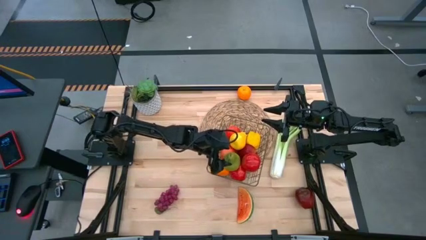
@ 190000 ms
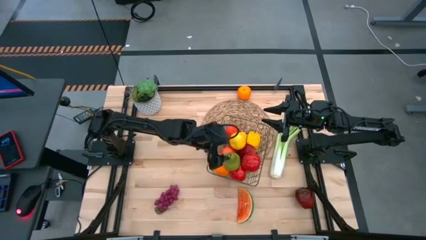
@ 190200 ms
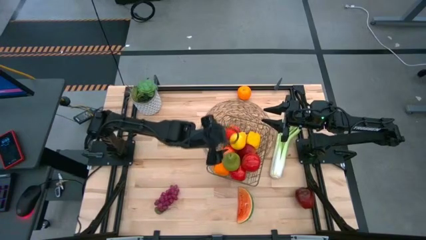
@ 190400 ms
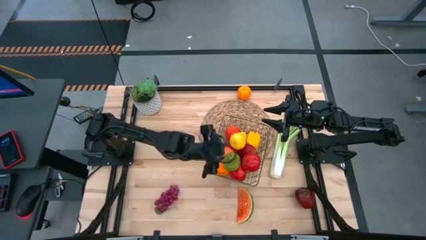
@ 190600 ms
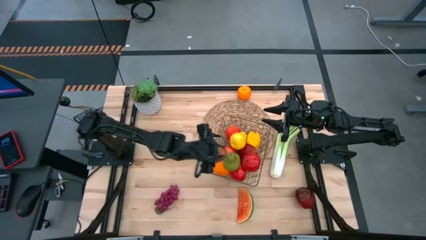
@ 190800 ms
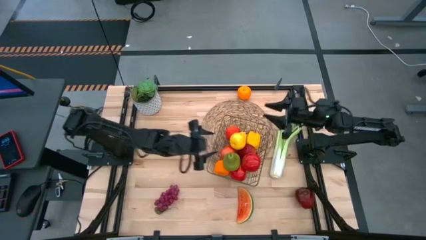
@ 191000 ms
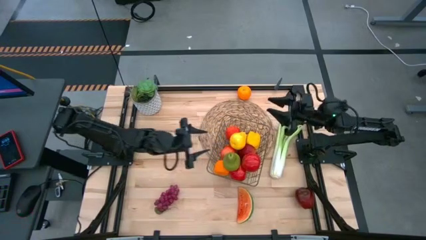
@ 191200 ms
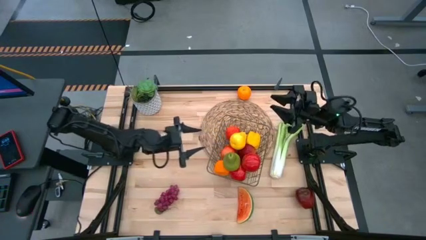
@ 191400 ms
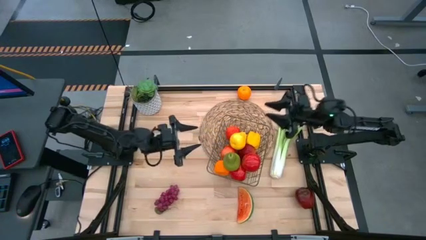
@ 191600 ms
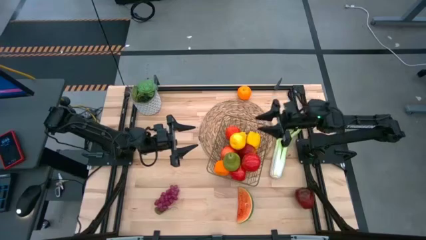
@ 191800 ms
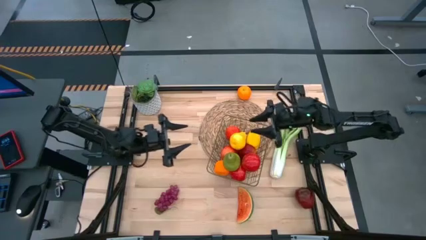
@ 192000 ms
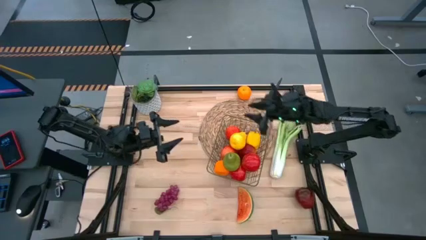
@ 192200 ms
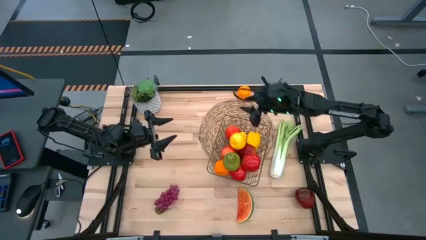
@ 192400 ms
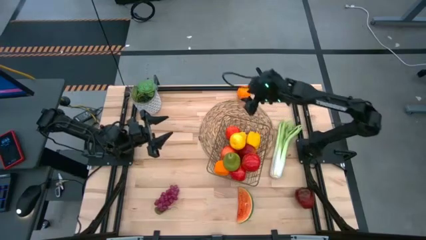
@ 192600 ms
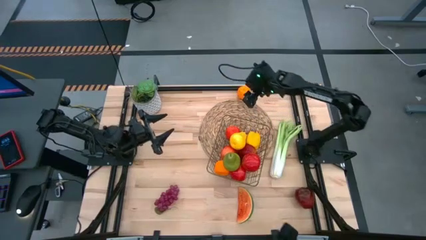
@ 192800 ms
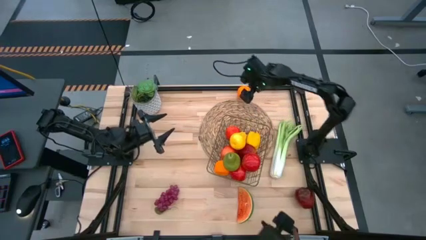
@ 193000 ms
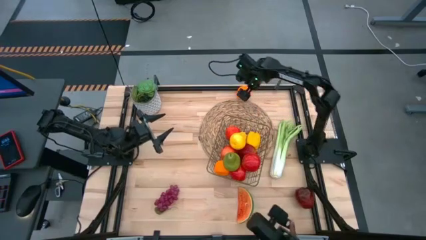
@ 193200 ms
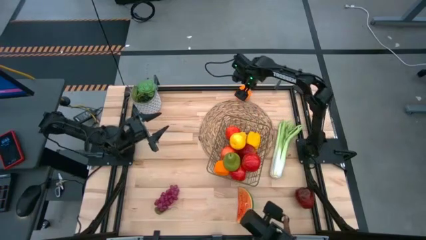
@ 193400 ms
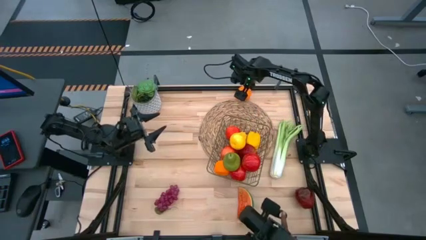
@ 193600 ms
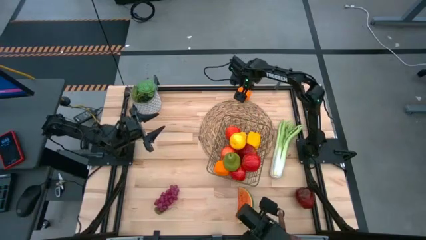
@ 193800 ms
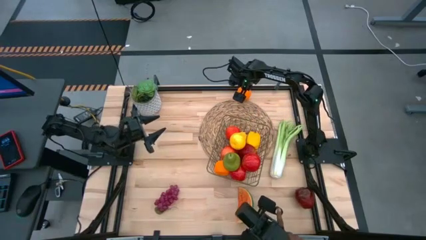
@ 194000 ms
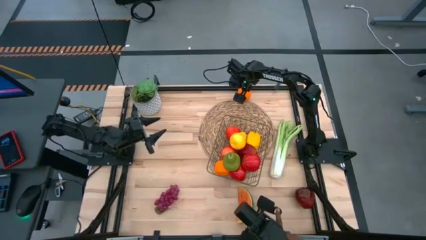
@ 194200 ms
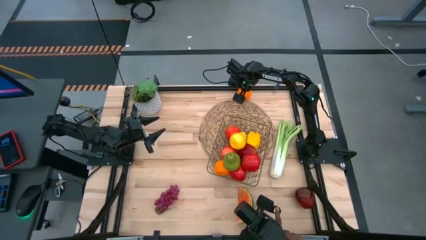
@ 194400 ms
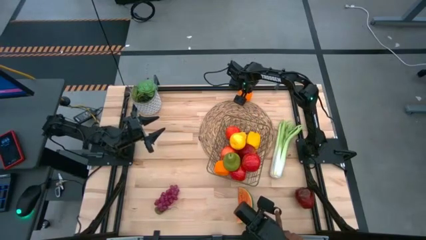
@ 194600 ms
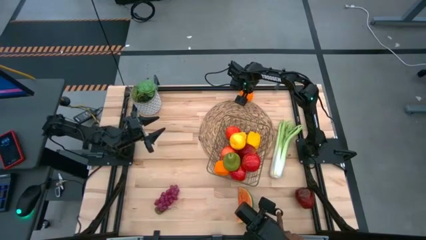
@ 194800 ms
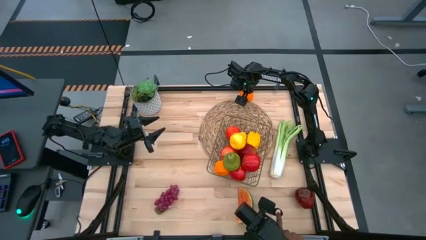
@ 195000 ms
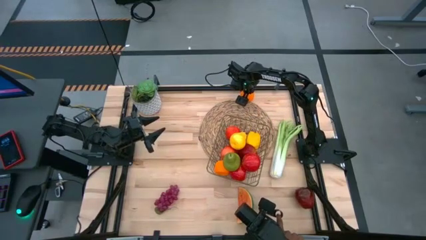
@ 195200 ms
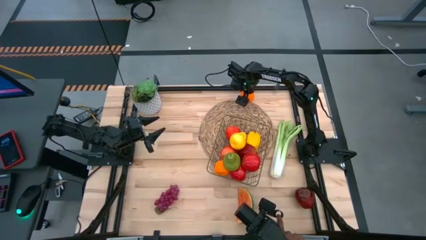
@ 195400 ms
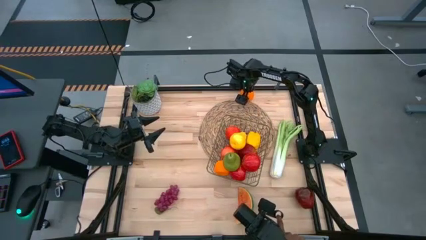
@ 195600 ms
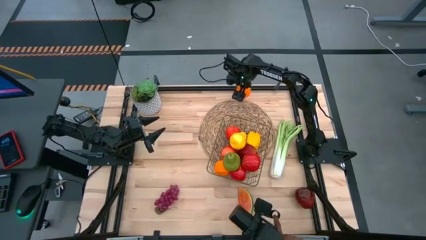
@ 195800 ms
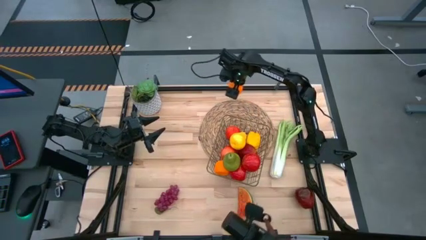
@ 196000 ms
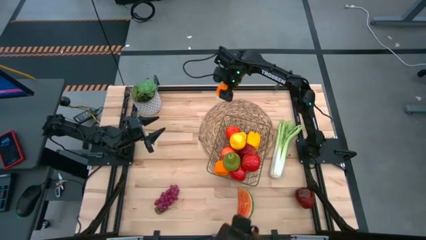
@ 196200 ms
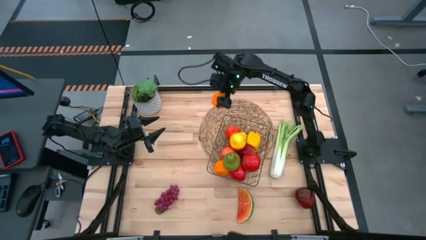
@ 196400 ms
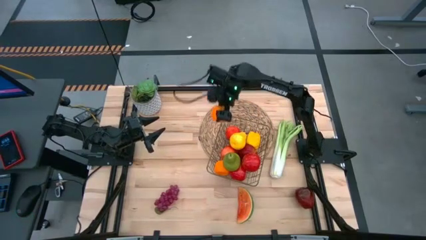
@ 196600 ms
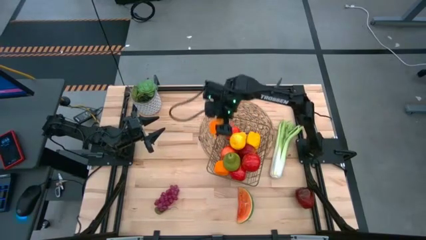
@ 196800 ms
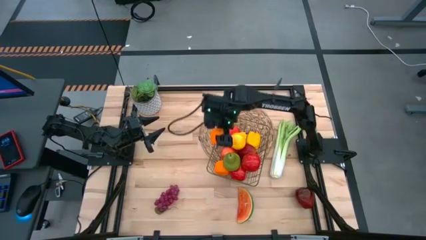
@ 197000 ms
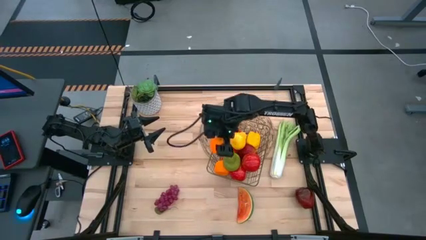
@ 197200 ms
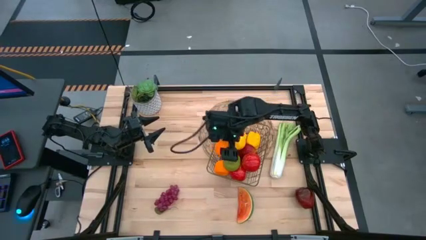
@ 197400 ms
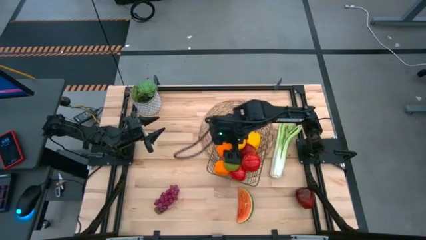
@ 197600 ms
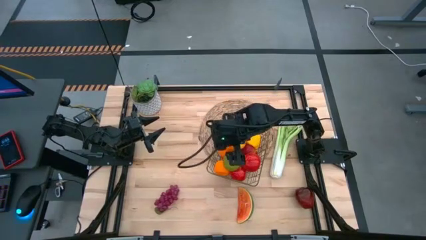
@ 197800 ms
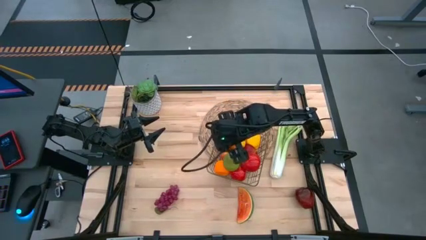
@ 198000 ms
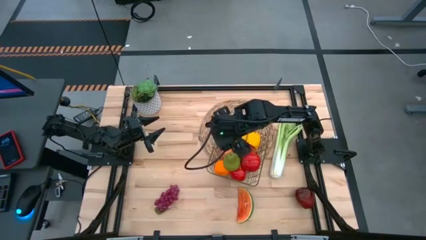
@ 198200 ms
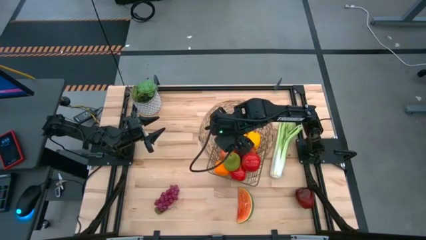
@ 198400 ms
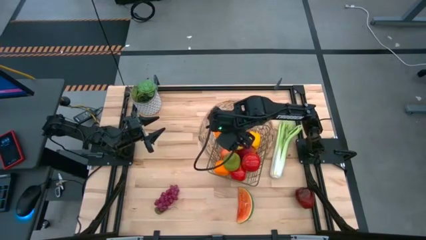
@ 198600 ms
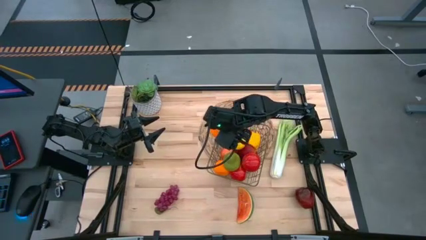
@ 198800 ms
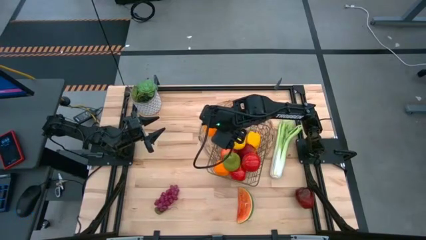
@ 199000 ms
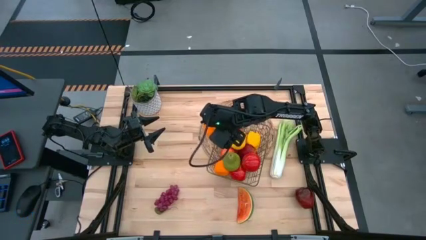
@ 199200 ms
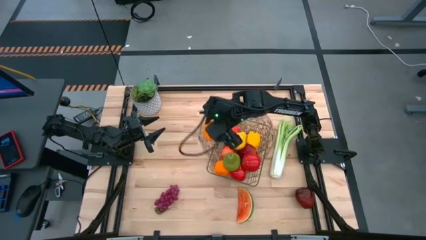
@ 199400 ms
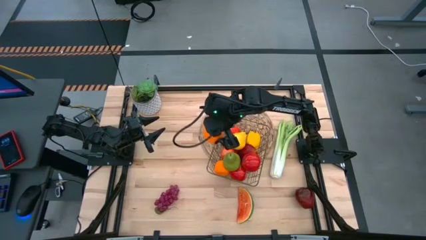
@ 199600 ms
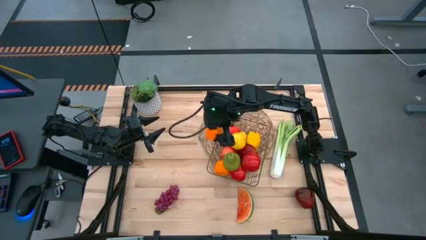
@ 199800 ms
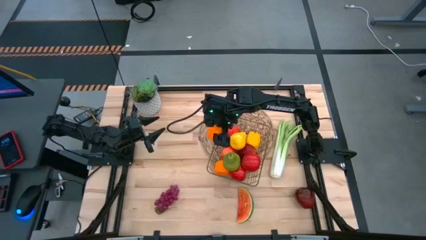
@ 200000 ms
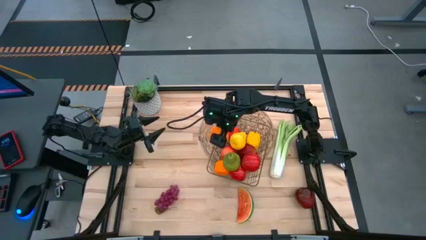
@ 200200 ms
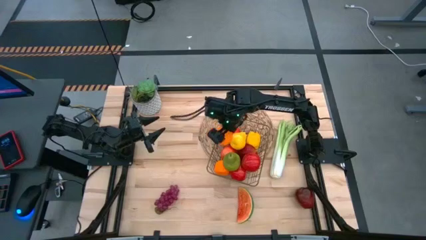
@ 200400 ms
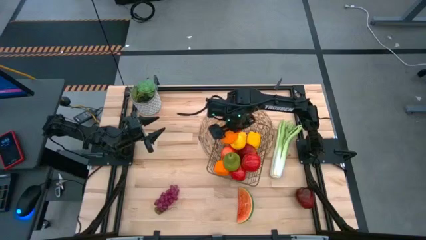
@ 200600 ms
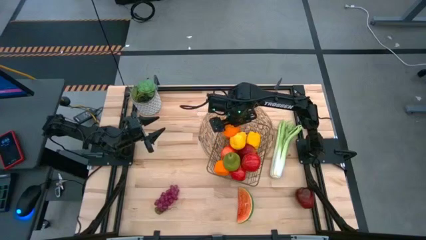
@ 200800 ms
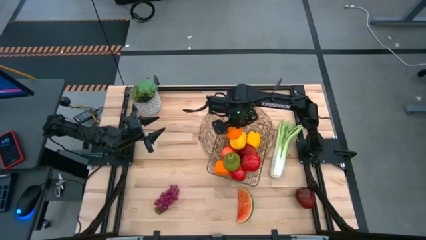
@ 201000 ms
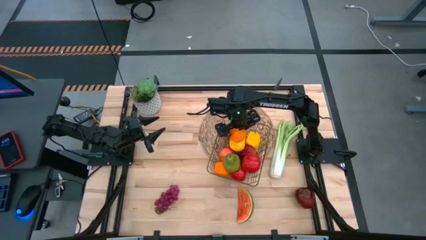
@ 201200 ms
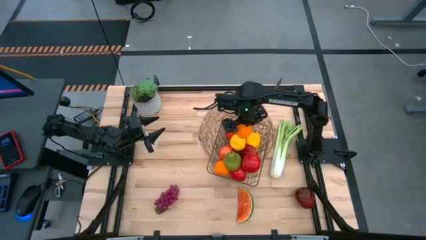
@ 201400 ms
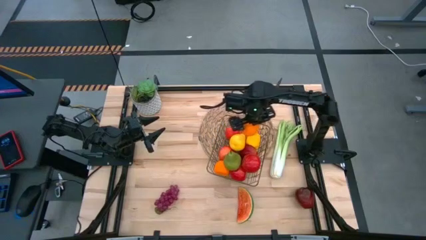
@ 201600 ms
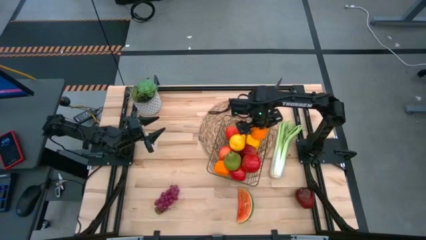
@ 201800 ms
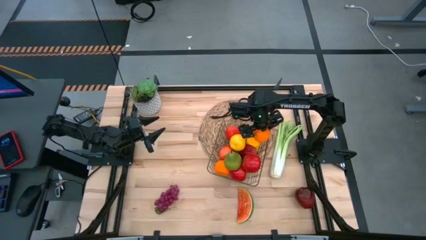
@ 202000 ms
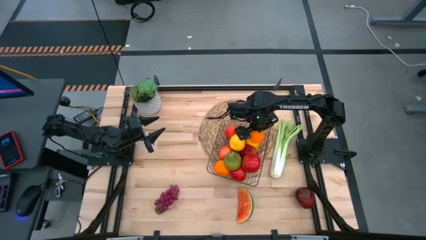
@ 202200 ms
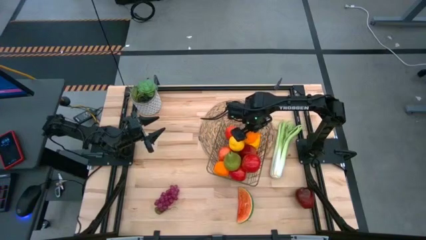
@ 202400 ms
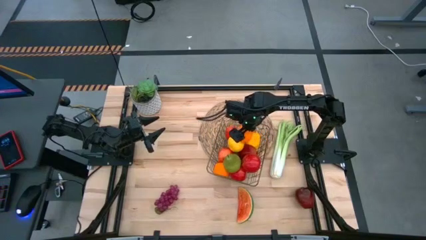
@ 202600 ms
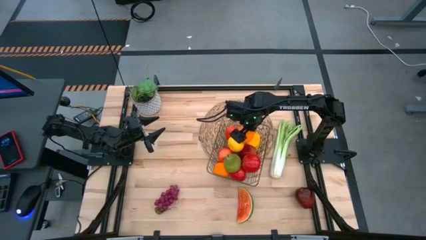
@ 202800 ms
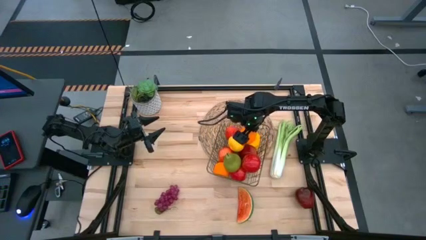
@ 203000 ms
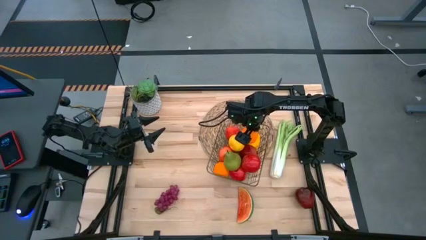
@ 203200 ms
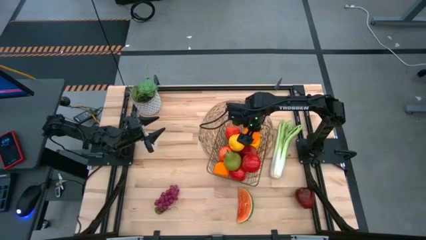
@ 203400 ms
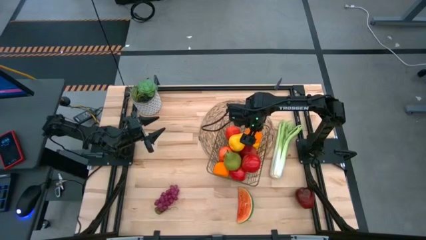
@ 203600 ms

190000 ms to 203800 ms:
Task: Build produce basket
Put the orange into the wire basket
